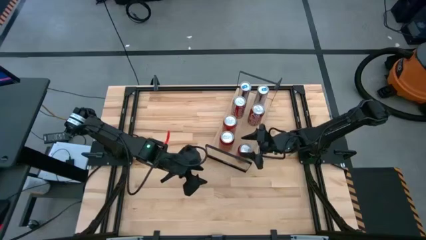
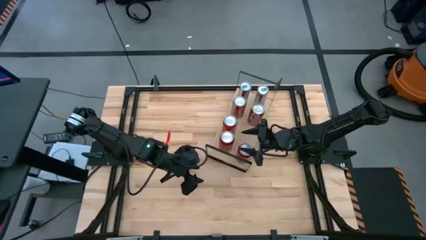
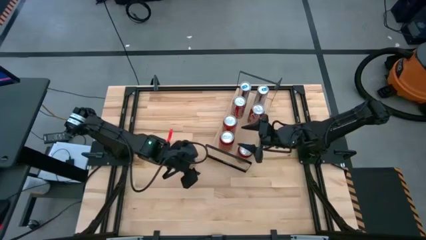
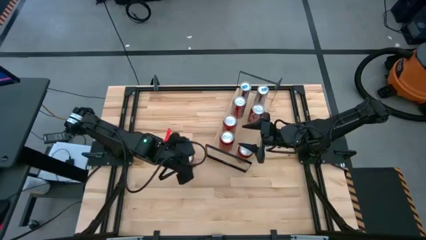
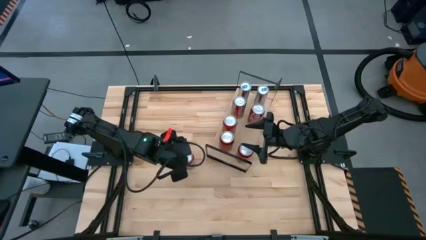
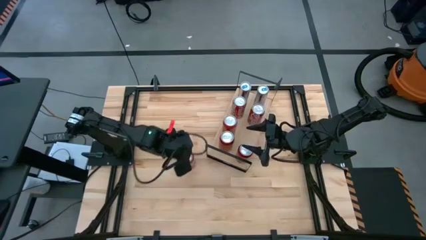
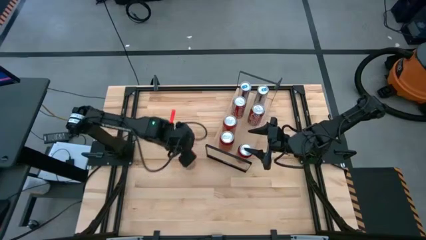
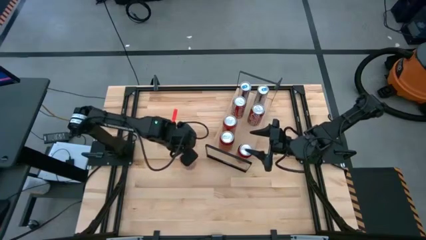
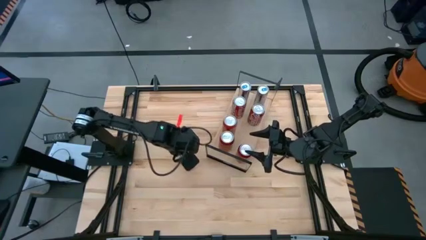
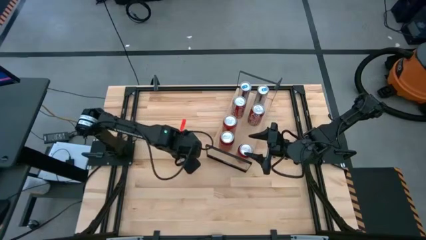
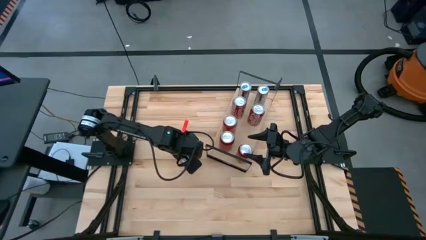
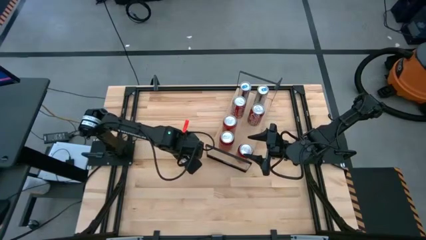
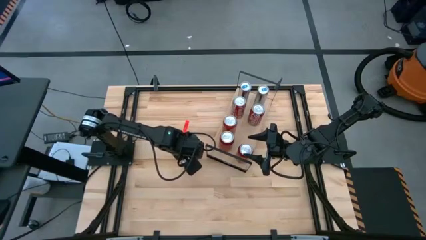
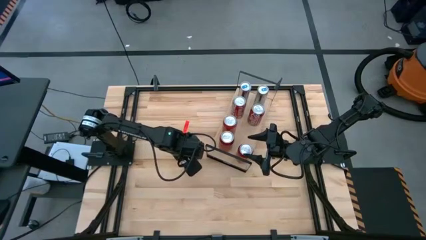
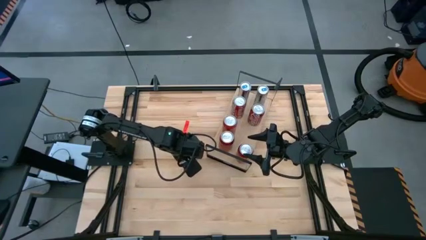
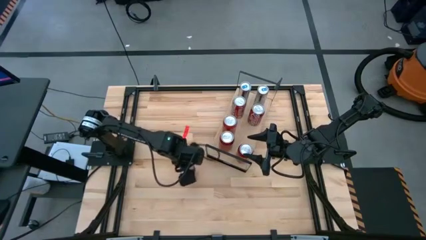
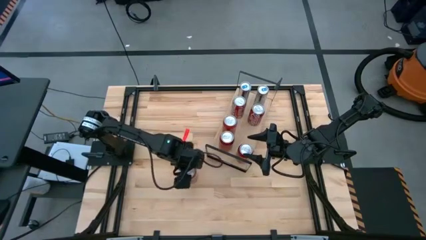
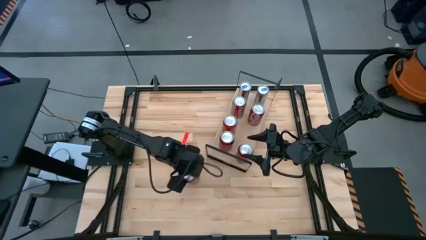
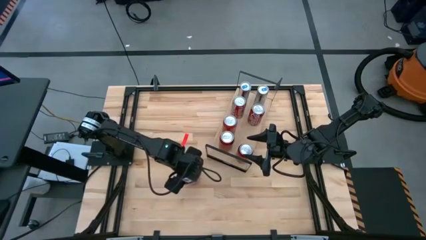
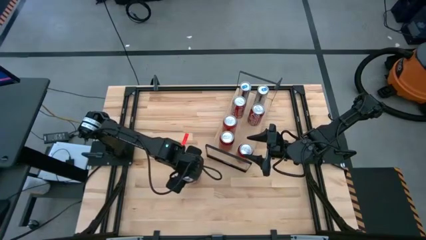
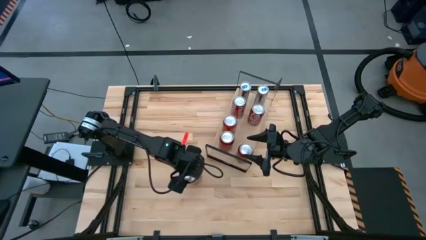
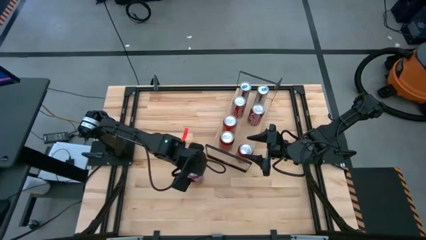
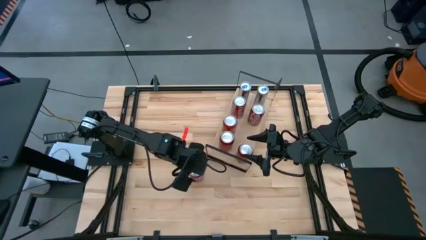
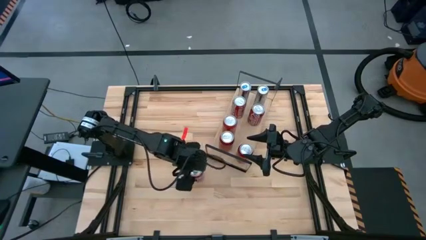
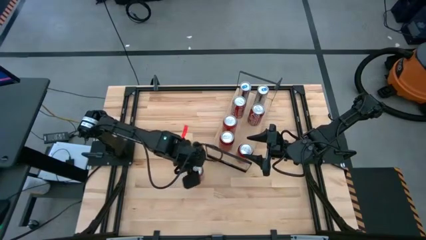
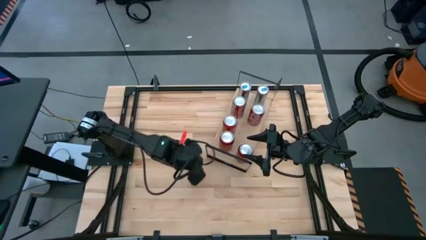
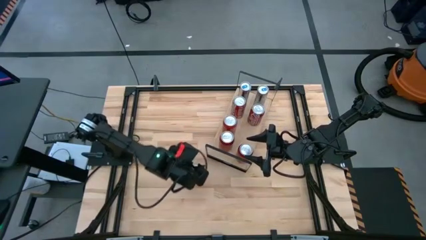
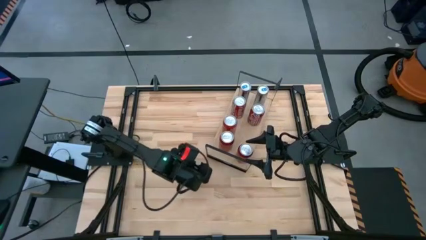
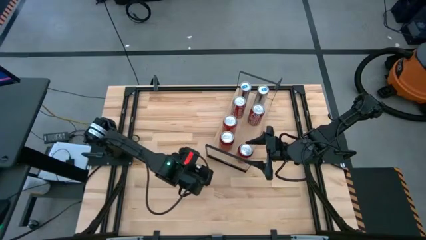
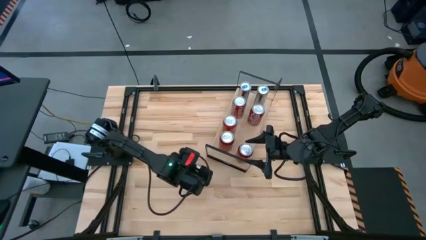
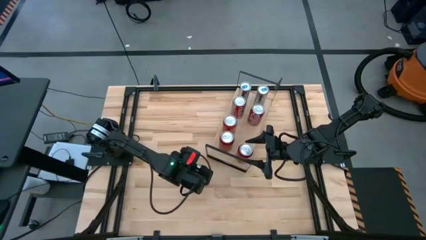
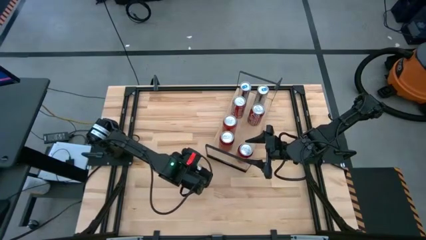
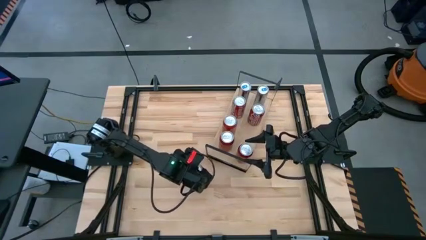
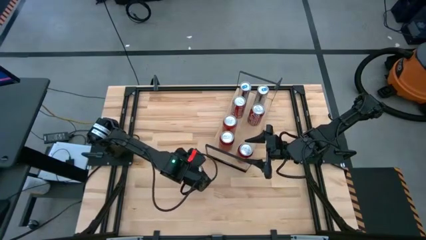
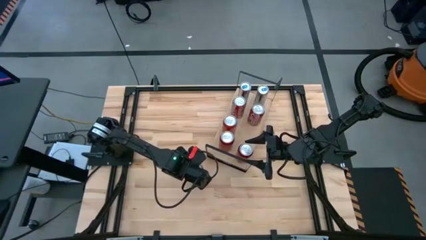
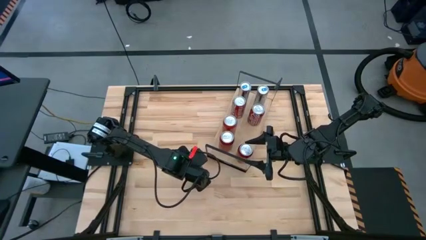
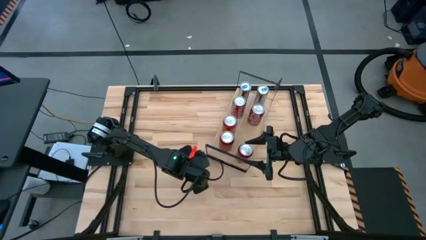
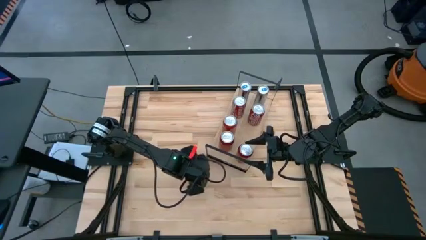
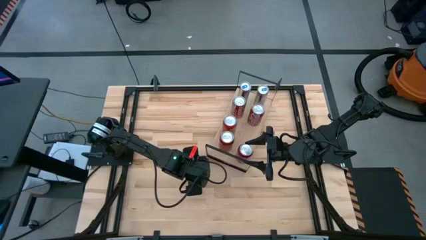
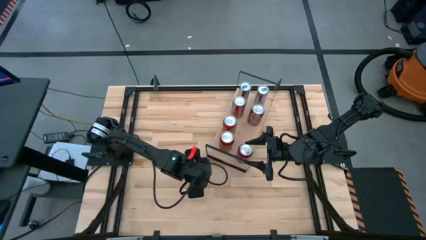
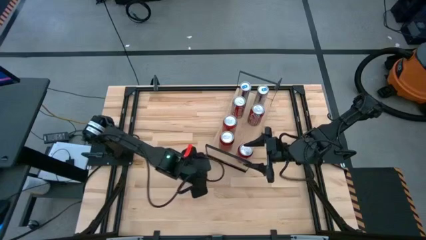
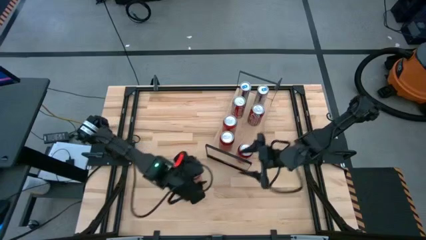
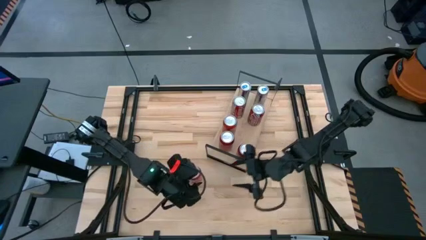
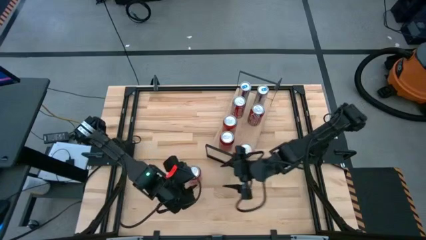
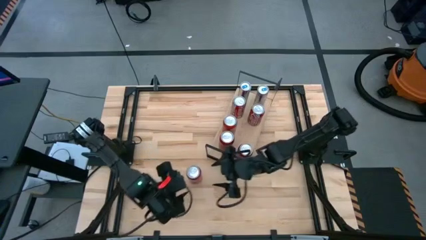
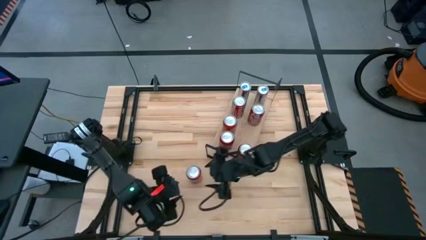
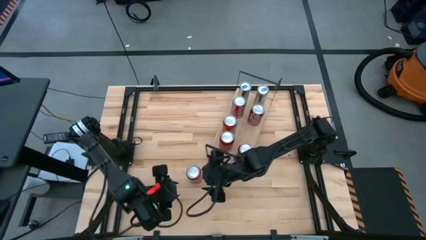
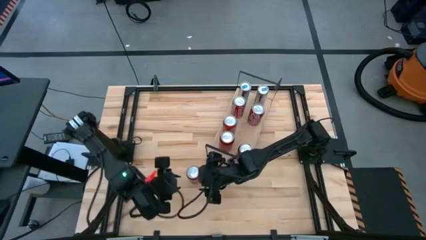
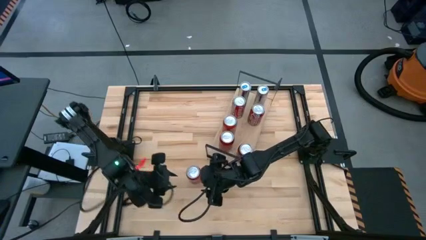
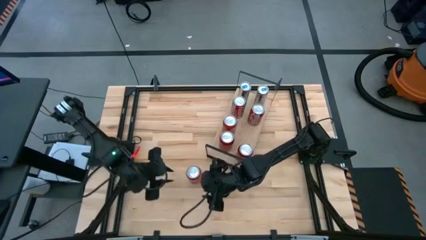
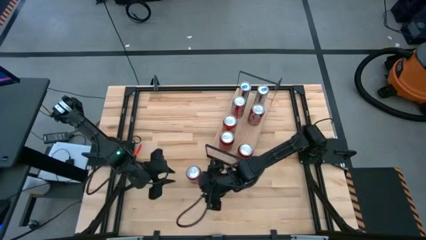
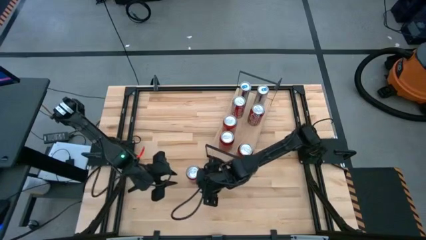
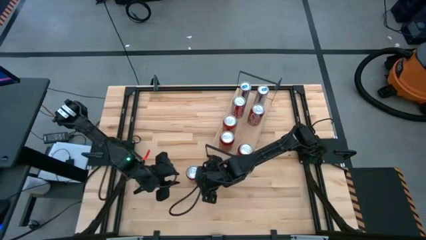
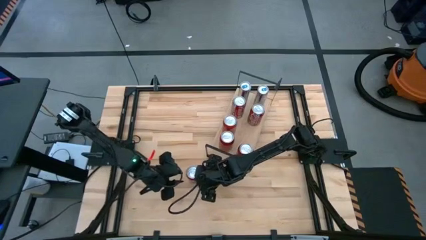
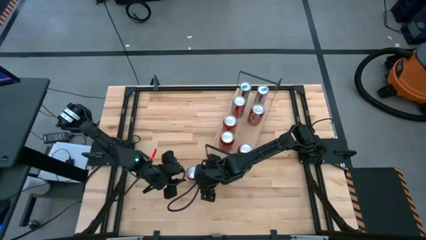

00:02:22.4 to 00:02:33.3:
Task: Place canned beverage on shelf
Put the red soda can on the shelf aligned with the other red soda can

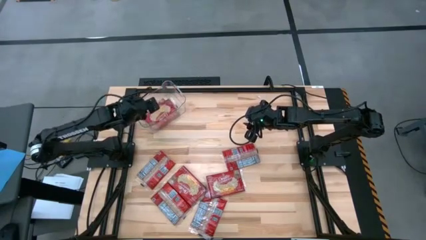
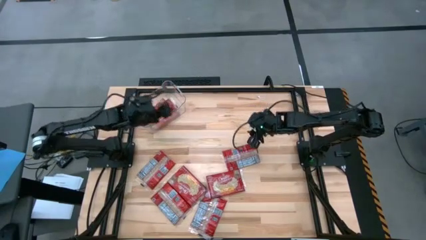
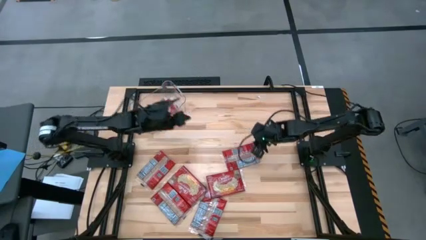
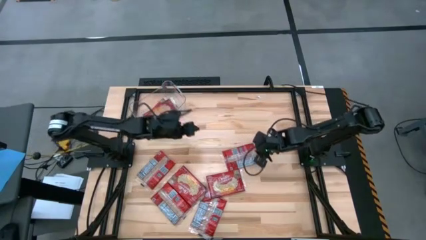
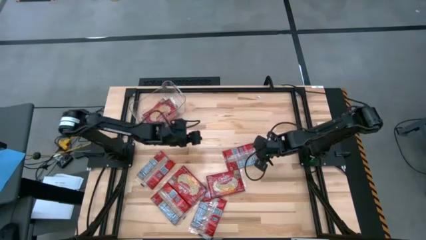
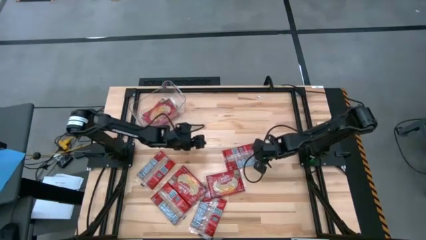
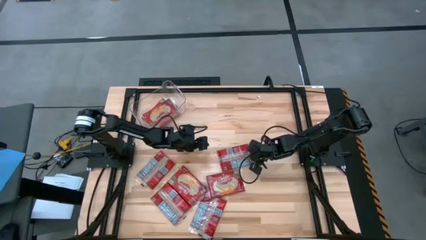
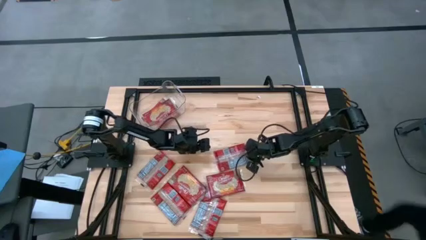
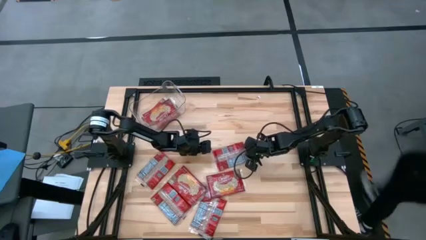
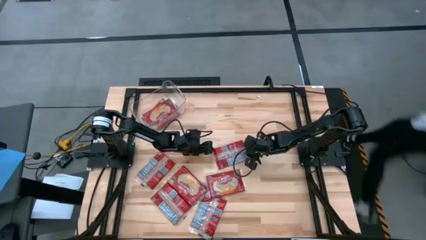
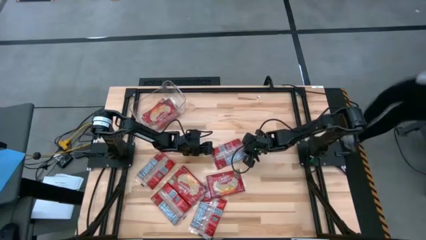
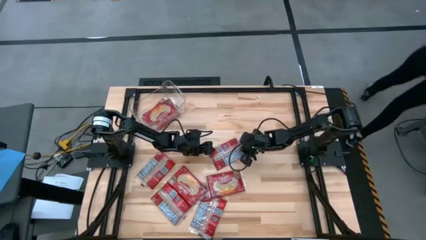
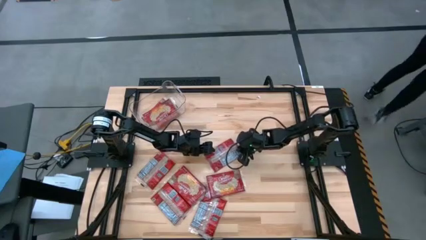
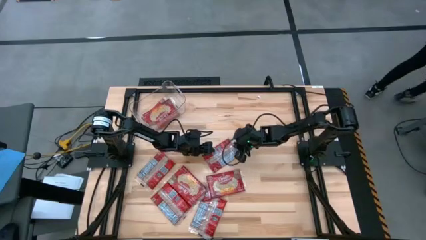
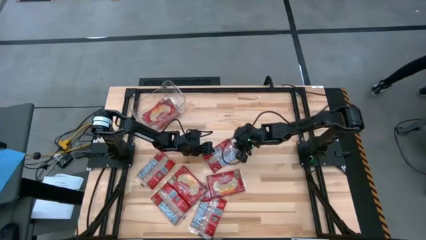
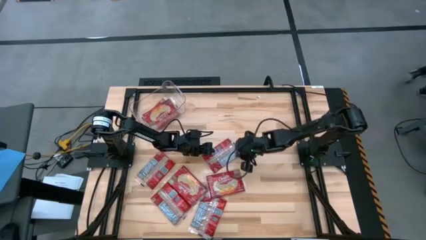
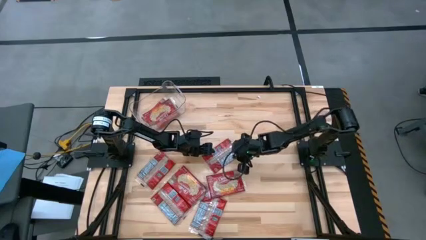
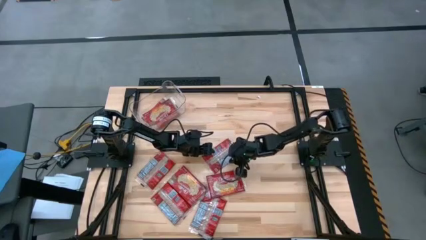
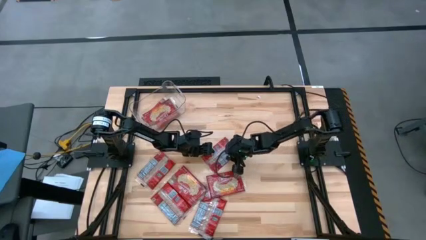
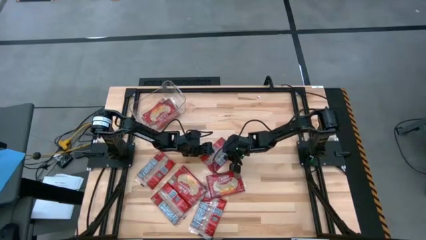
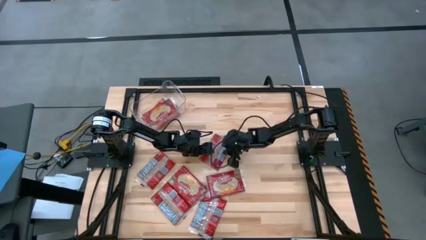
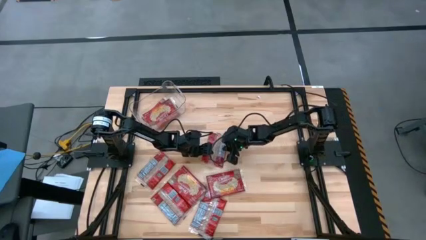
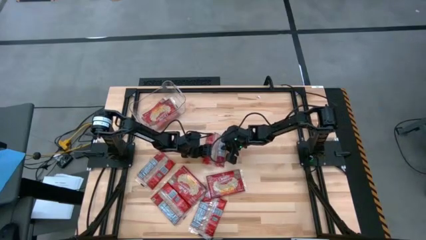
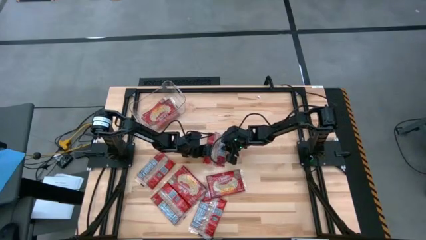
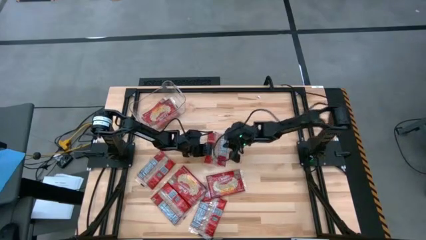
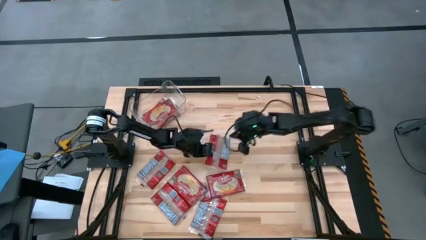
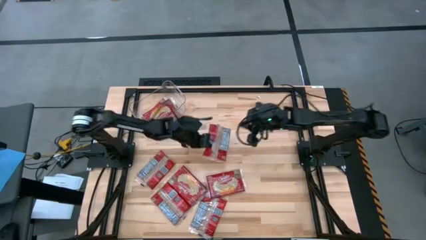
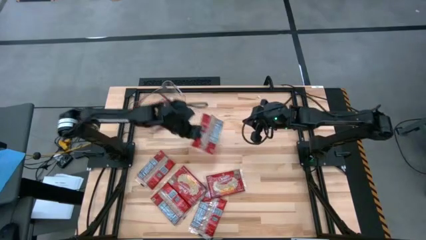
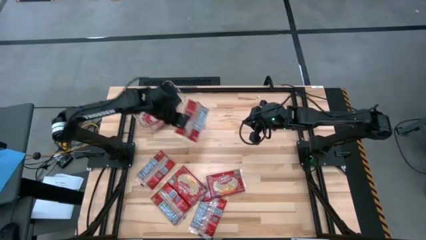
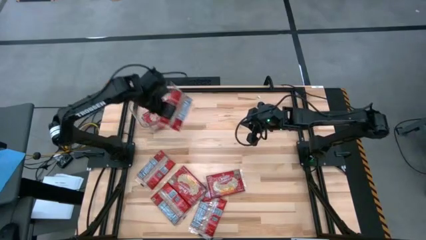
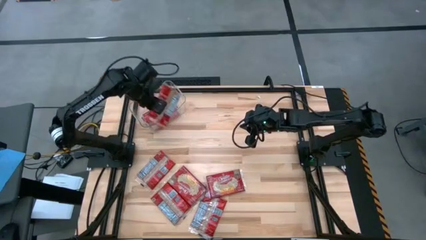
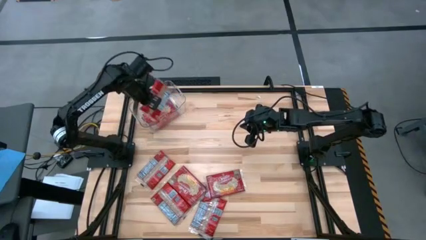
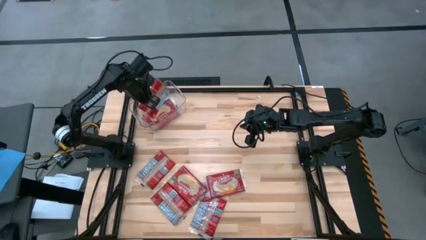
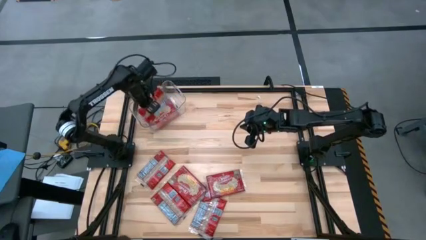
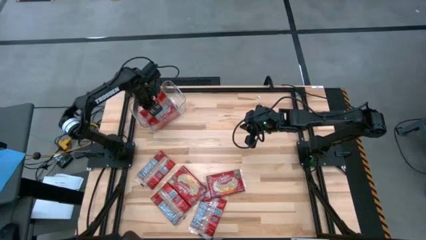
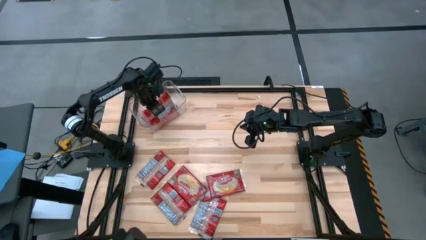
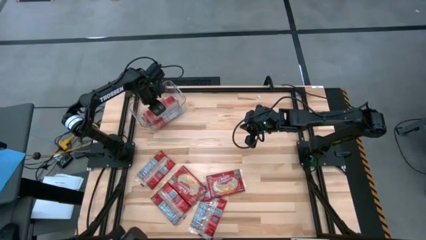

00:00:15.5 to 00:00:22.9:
Task: Sort popcorn bags into baskets
Put the red popcorn bag into the transparent bin
